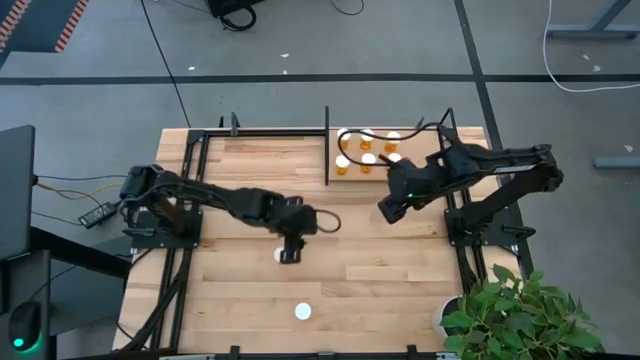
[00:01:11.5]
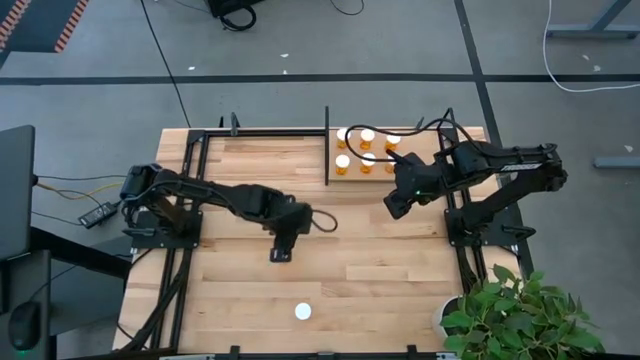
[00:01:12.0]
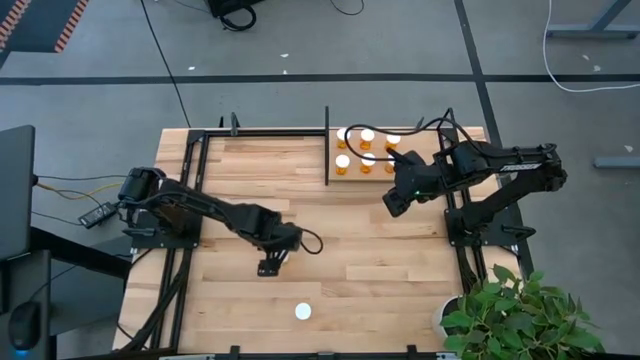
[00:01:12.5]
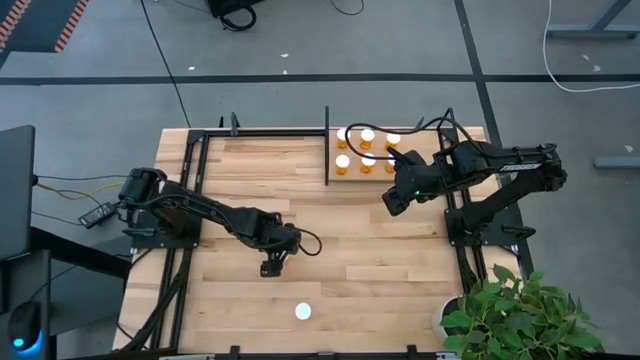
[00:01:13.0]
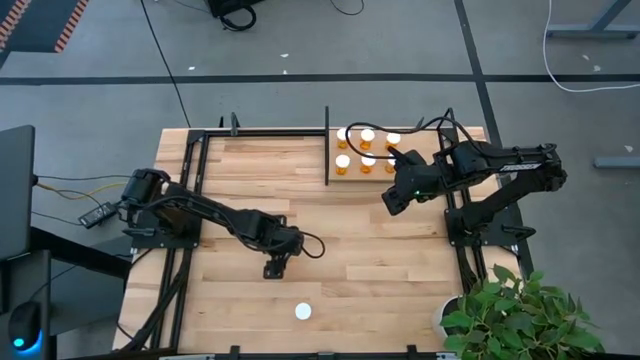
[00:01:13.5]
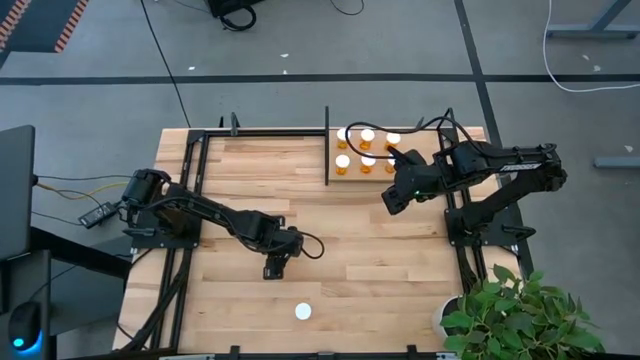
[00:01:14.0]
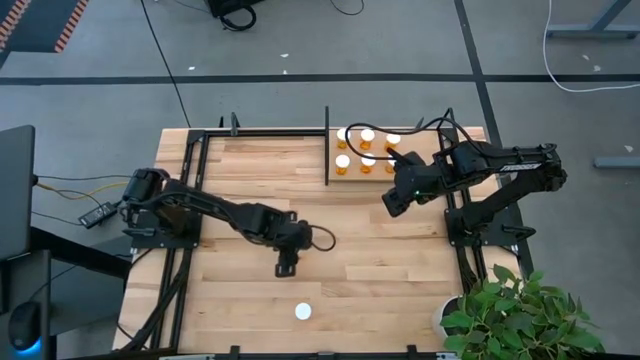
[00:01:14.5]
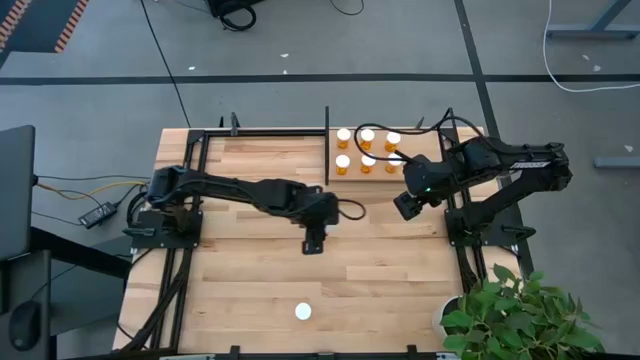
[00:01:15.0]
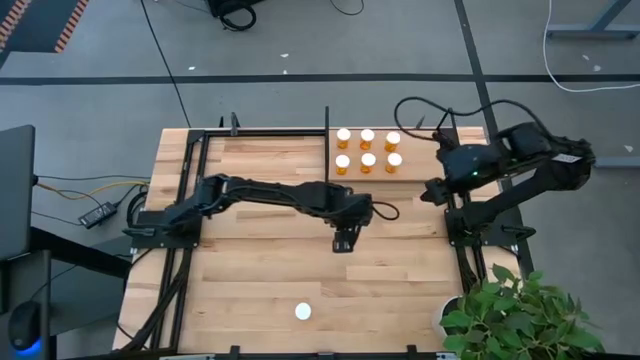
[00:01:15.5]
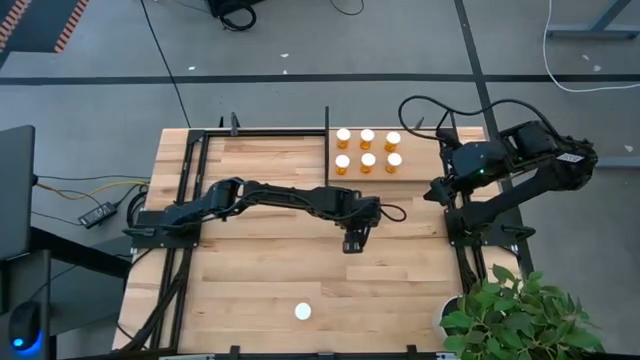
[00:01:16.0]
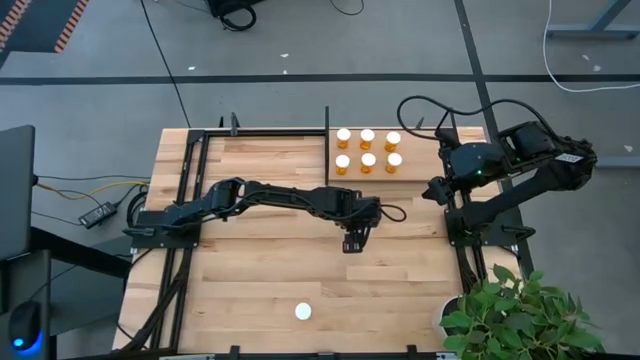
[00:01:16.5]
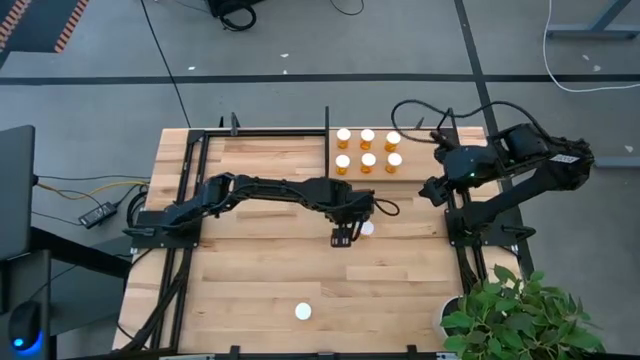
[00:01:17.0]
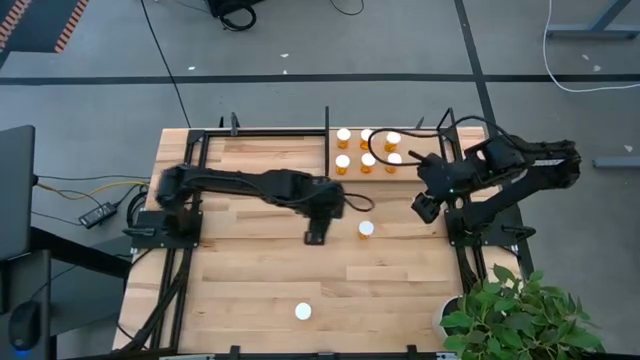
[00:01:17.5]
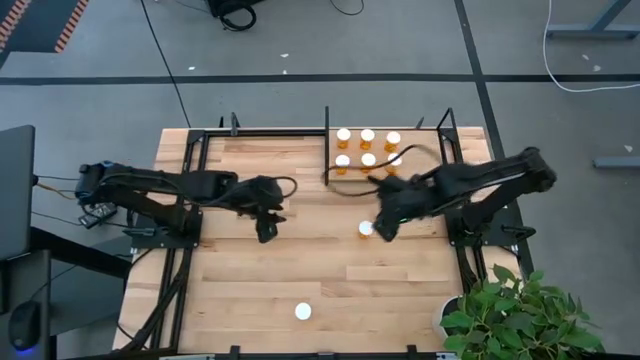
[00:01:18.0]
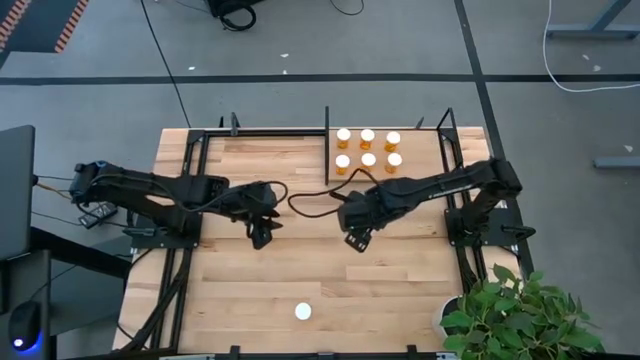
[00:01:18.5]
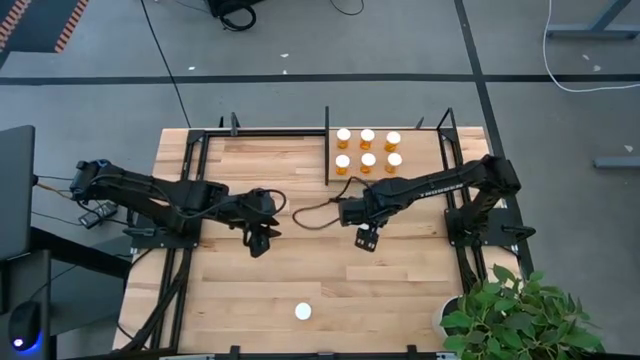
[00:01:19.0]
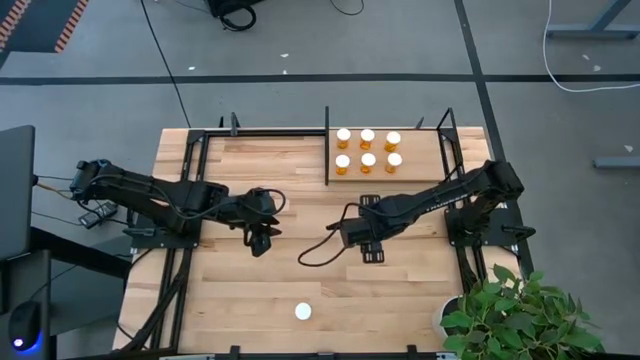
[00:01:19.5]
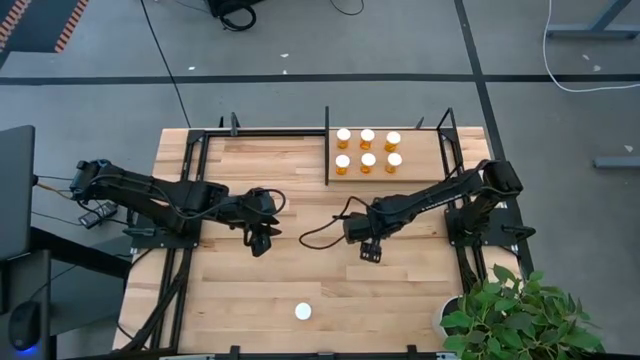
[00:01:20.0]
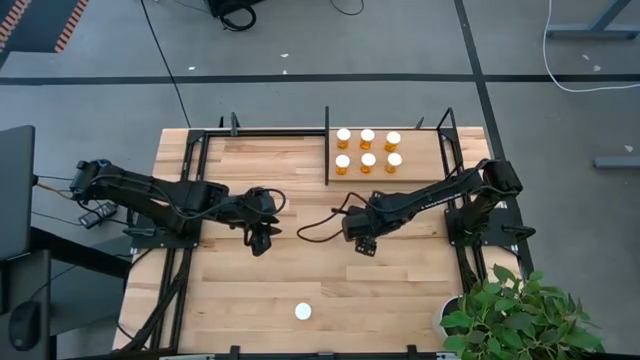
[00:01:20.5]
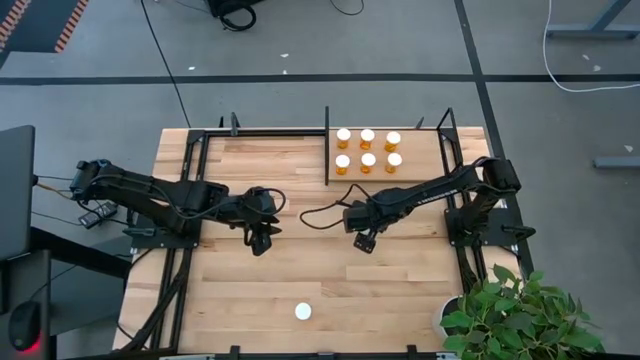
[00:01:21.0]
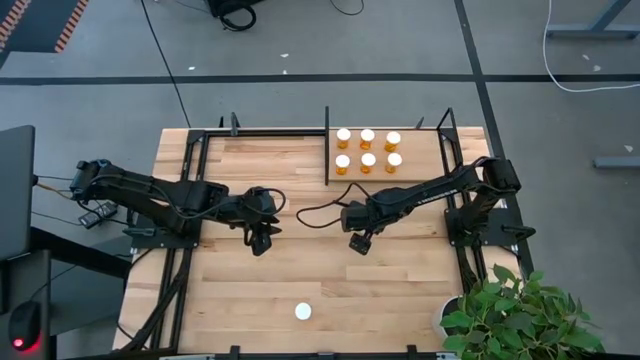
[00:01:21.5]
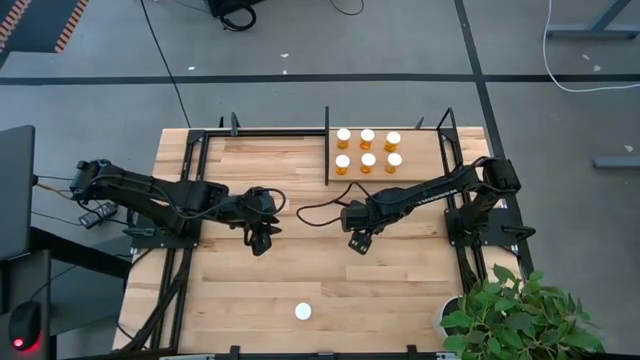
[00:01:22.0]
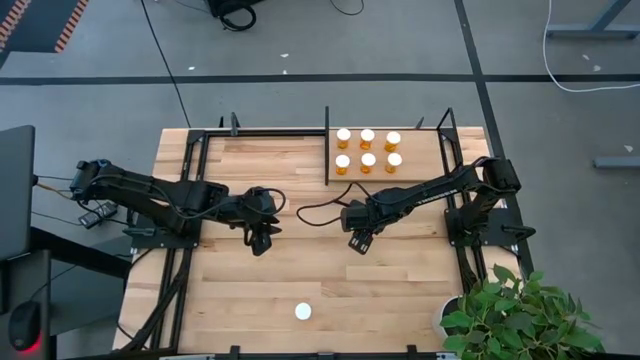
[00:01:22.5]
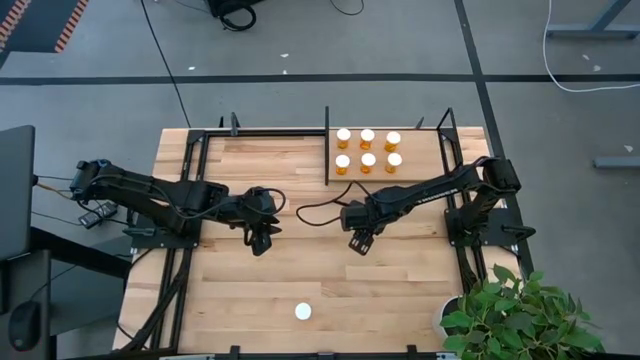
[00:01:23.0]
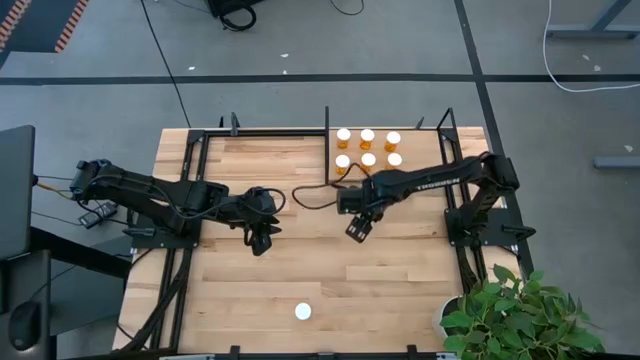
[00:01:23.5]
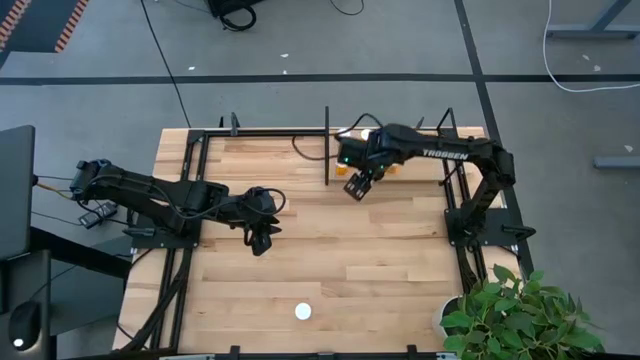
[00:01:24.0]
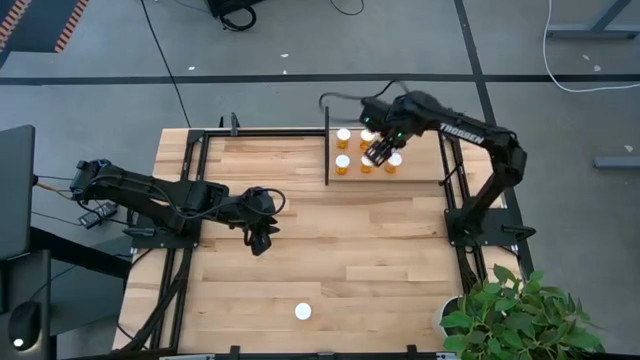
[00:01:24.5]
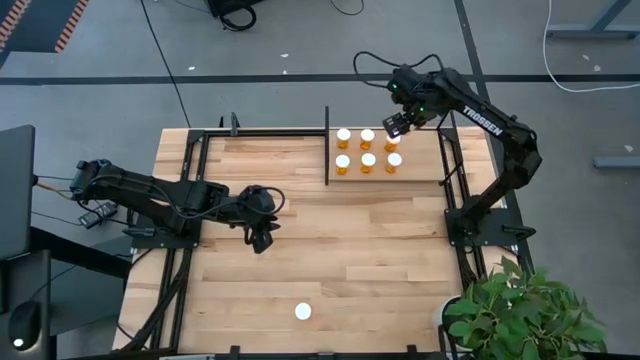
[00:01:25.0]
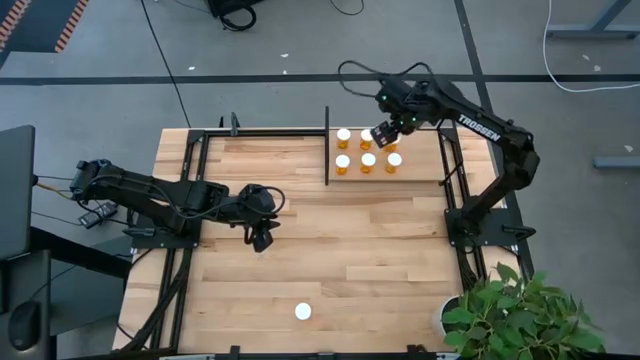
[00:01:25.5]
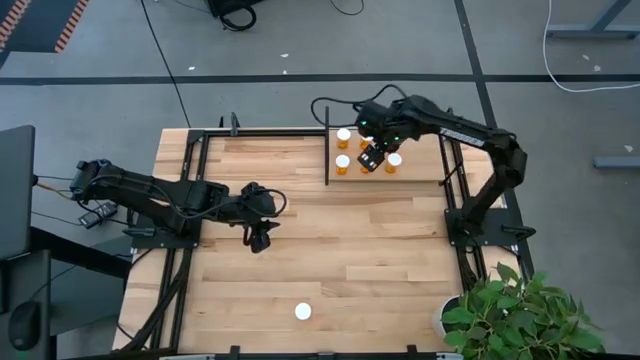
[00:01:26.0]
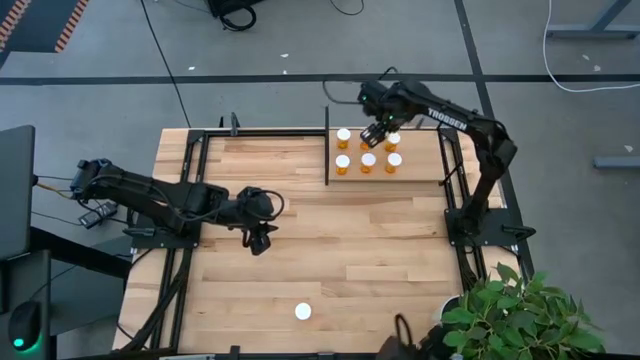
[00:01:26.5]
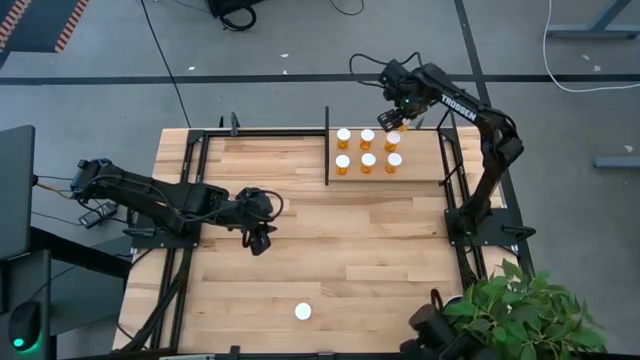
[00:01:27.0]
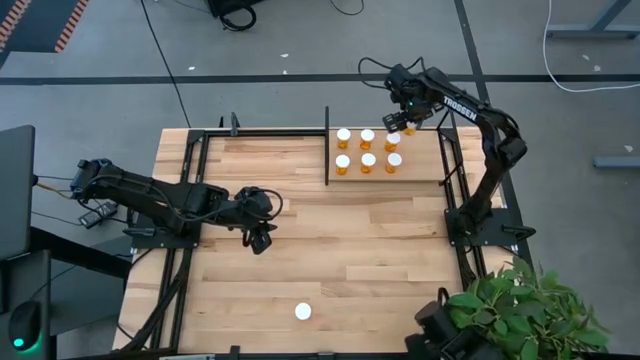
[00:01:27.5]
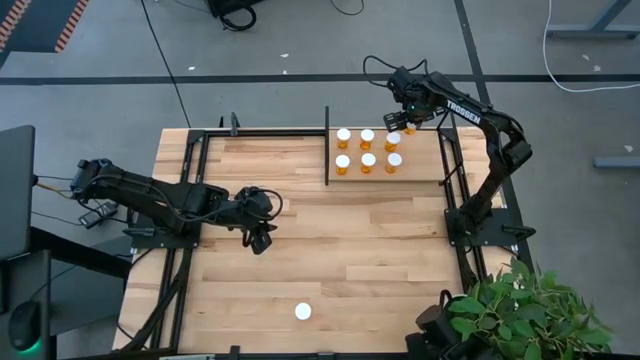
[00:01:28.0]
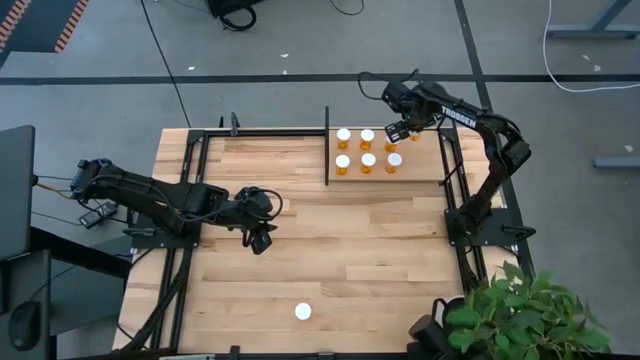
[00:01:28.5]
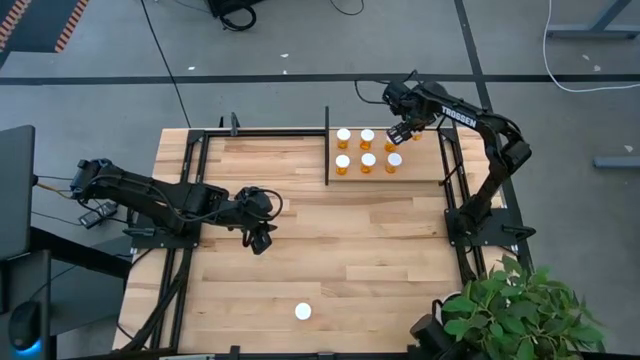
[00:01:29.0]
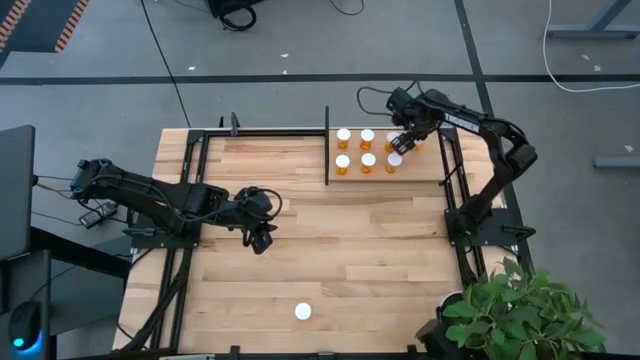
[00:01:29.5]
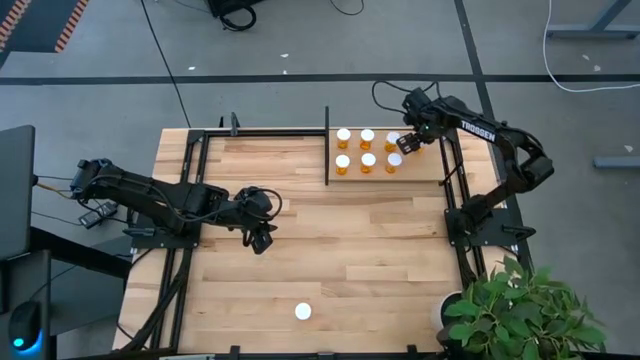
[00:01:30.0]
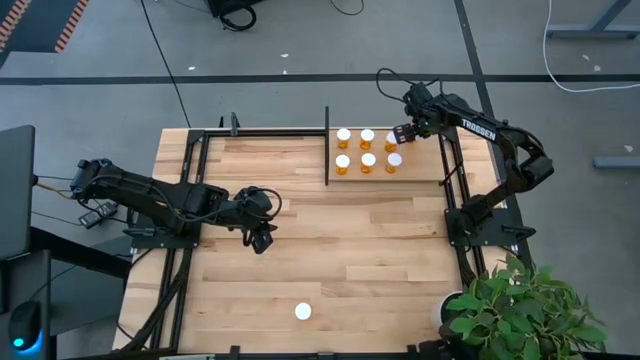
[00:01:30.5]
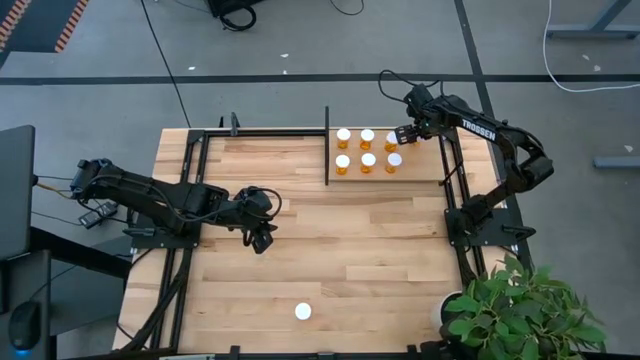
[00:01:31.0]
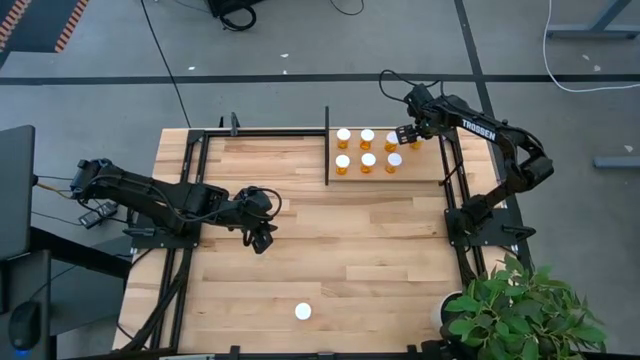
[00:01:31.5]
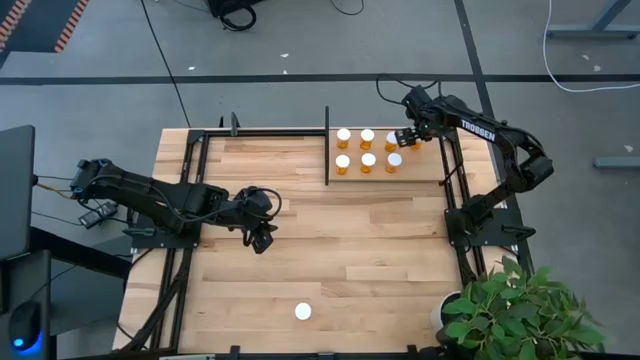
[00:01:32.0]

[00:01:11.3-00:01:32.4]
Task: Pick and place medicine bottles onto shelf by color
Put the orange pill bottle on the shelf
